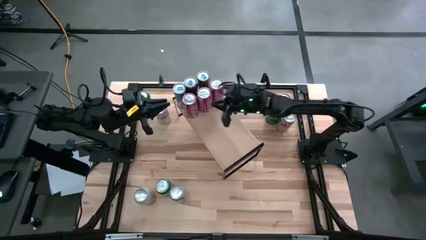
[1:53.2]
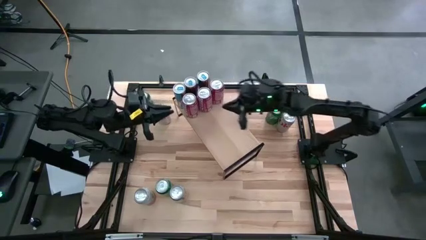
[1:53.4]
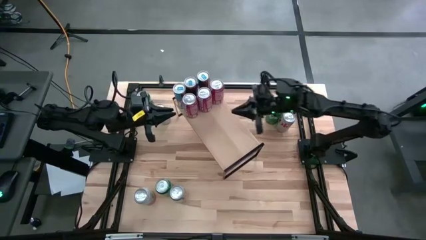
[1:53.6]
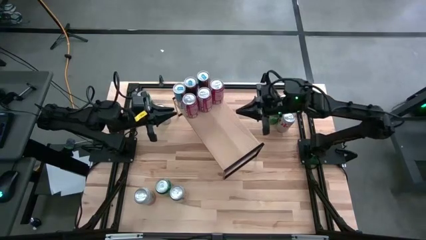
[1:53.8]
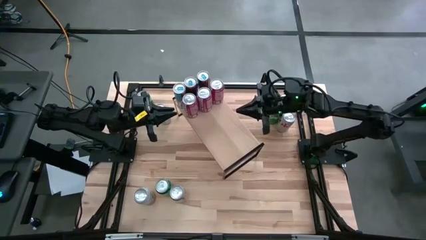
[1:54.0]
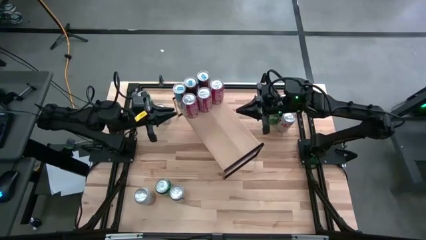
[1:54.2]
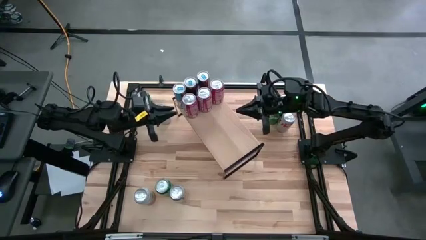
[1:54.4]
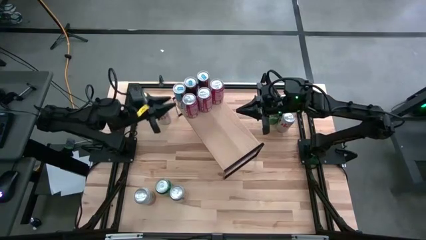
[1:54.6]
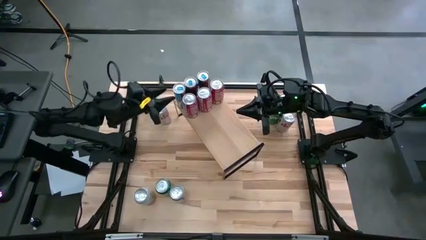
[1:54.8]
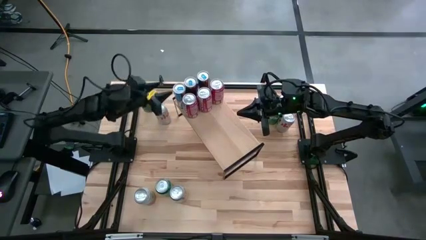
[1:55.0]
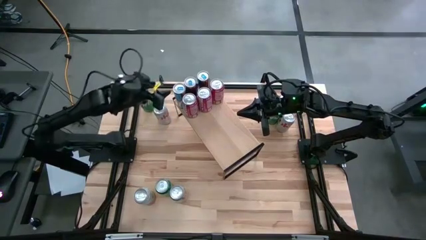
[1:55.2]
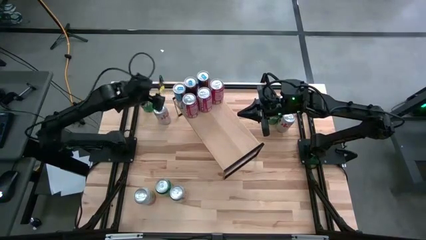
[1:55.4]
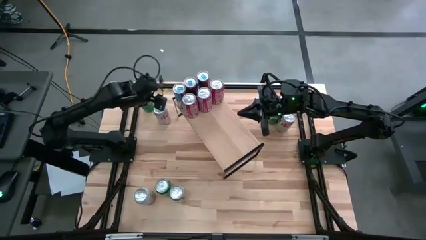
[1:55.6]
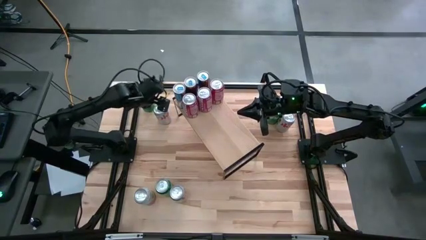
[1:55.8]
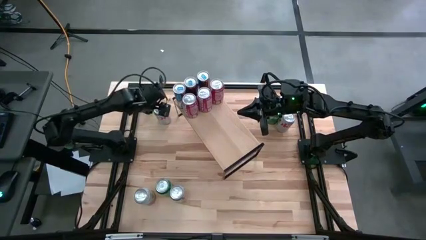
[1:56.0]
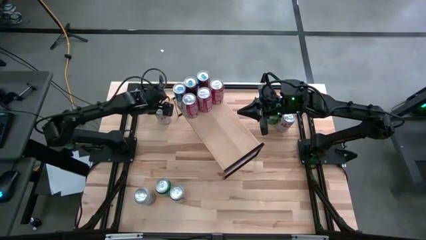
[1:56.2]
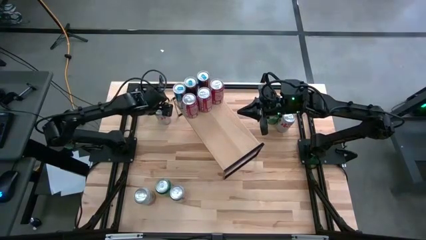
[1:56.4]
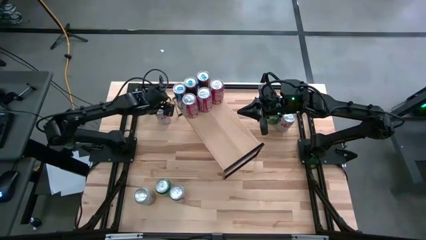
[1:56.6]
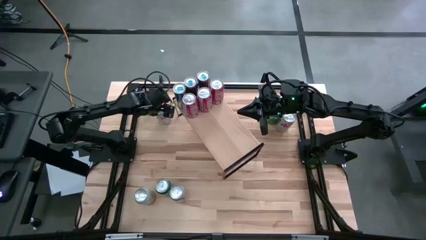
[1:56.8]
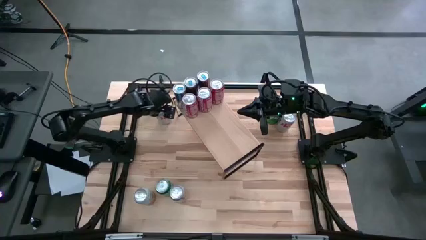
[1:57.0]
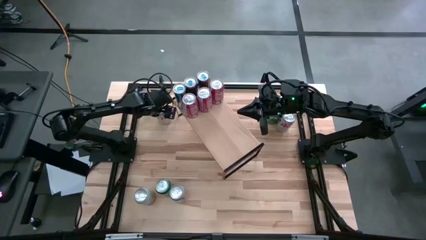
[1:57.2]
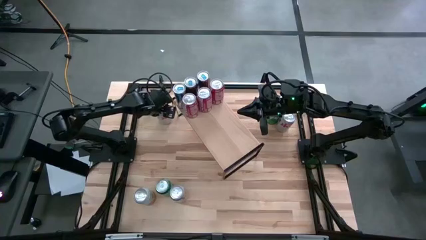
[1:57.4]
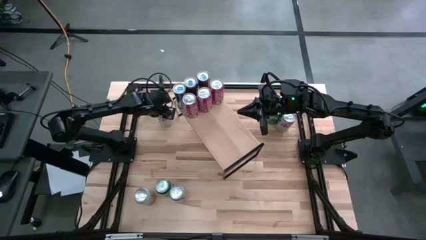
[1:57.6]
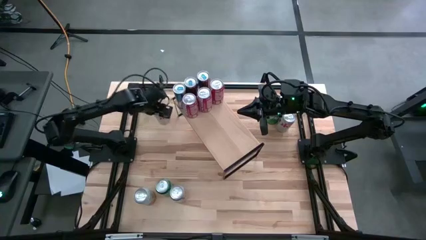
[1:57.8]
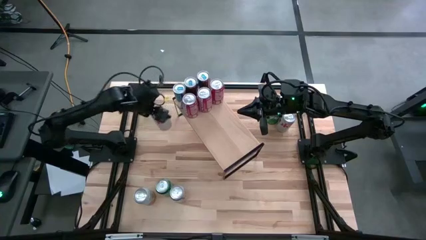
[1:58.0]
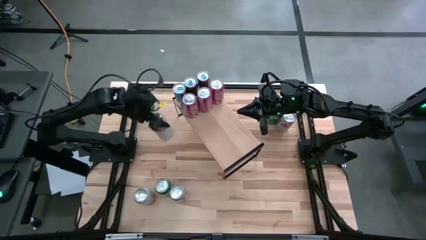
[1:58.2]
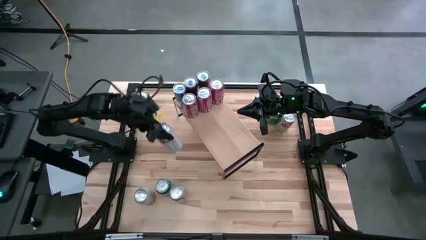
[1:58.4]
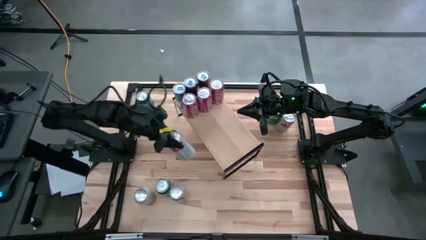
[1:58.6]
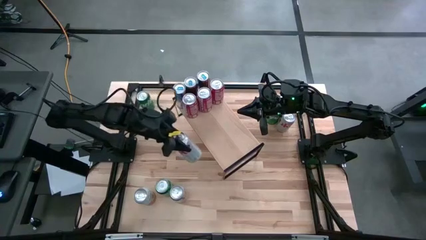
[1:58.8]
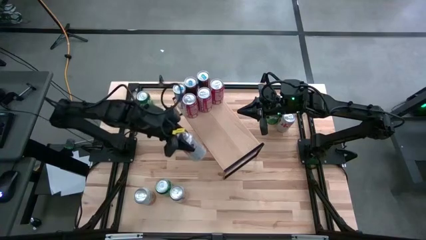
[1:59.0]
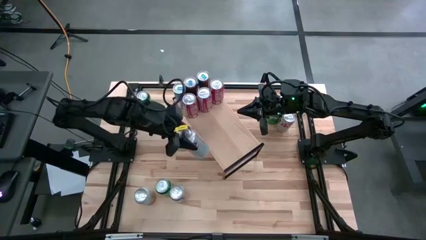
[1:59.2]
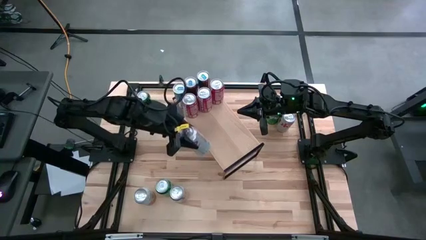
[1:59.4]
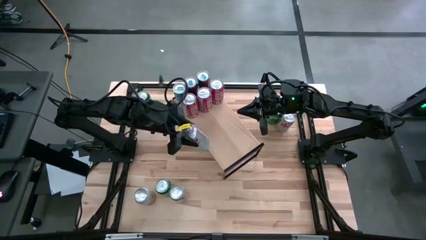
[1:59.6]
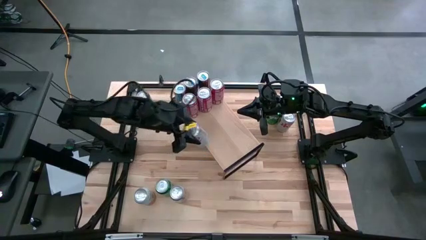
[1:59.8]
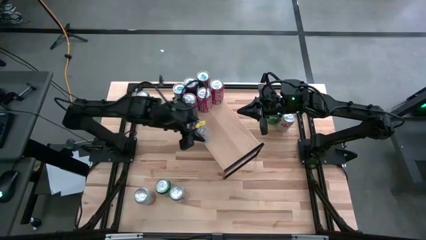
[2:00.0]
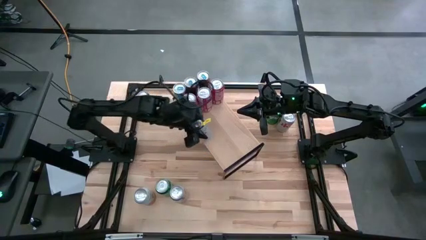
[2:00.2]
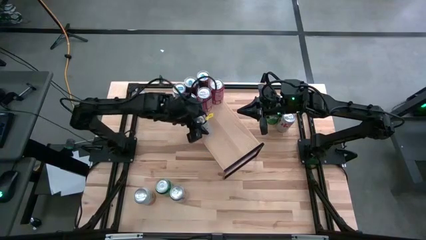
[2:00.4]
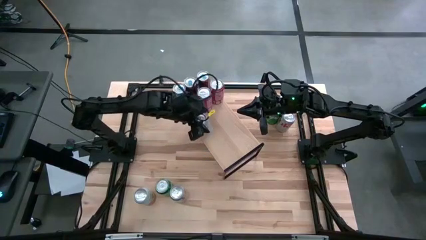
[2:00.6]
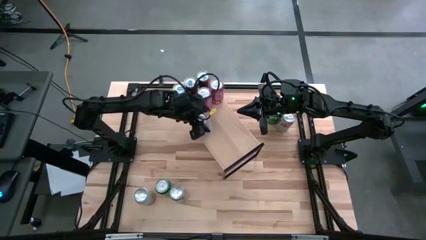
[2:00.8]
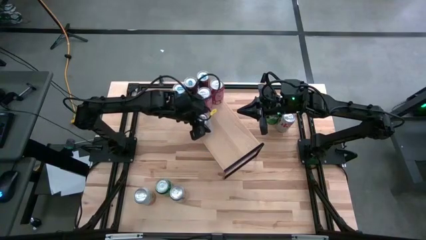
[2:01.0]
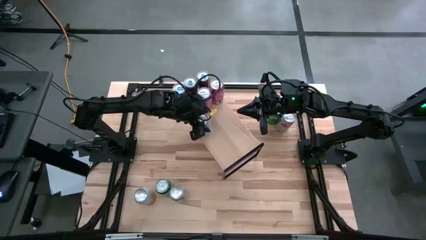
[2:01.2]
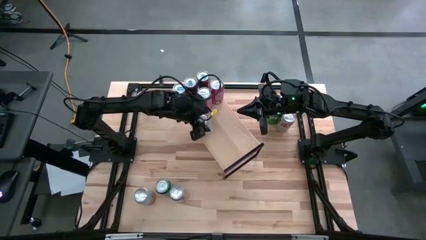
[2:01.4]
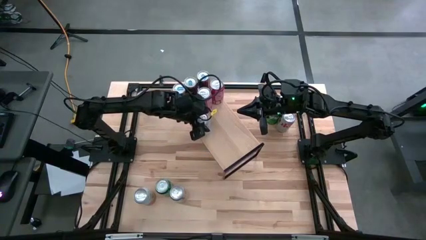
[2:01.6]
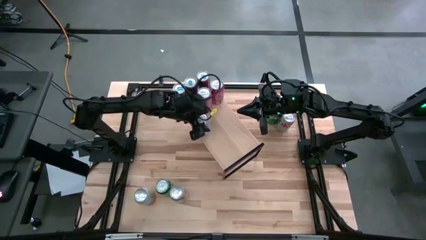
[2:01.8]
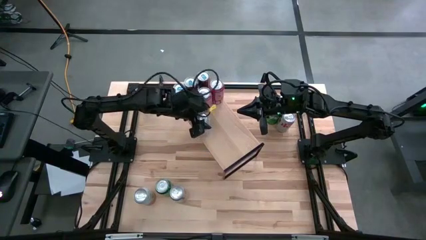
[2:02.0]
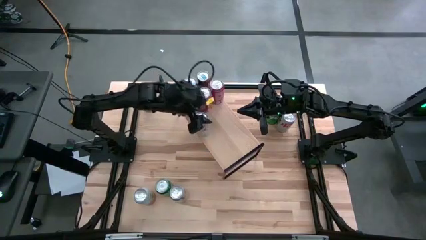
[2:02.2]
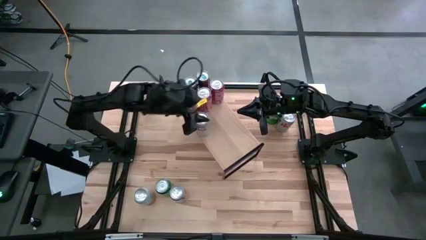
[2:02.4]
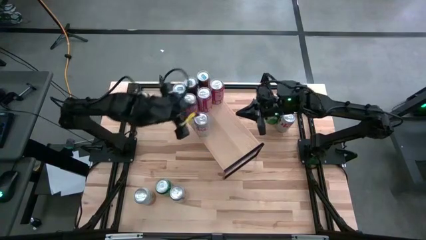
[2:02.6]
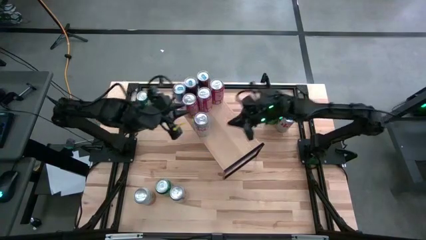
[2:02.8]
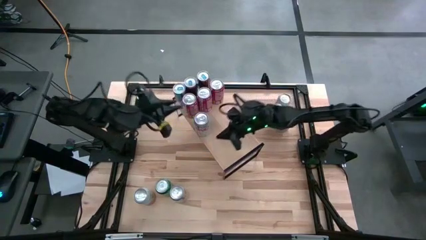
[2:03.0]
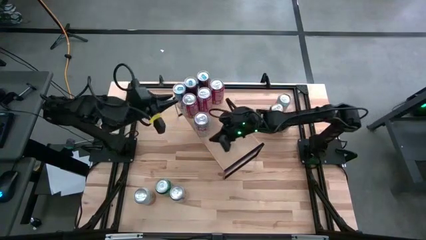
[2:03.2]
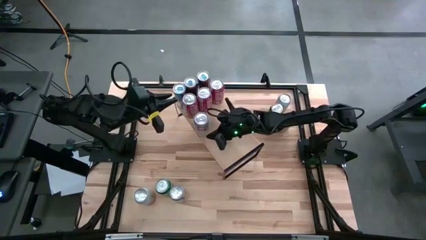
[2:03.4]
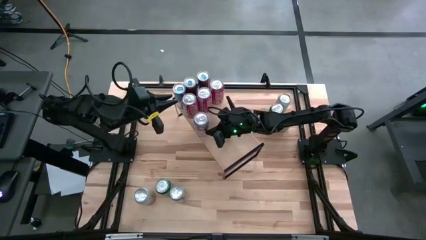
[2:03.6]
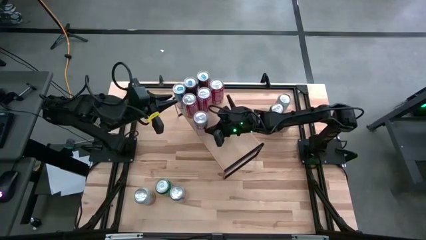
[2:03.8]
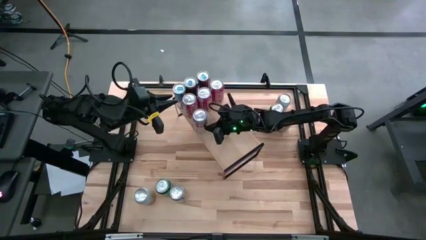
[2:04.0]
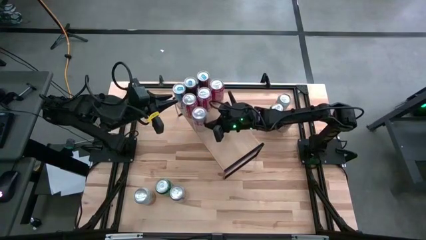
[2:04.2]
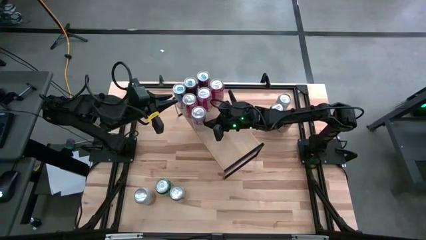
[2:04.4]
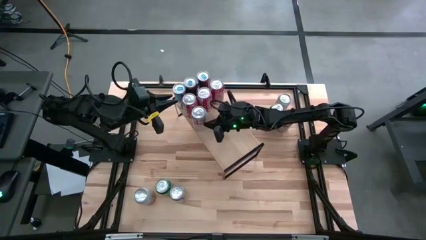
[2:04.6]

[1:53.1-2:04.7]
Task: Place canned beverage on shelf
Put the top left silver soda can on the shelf
